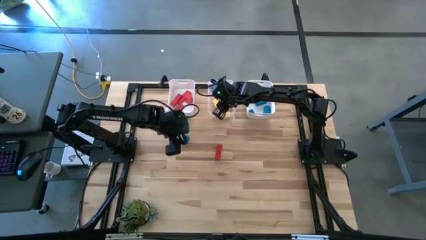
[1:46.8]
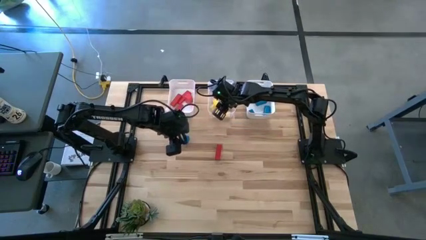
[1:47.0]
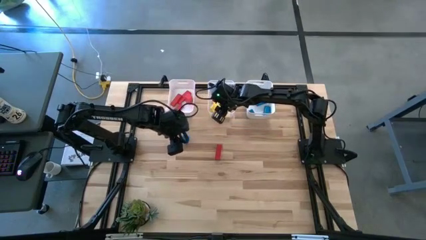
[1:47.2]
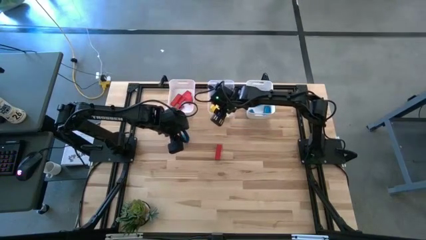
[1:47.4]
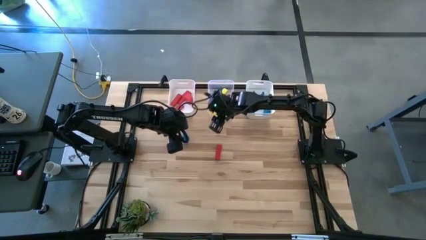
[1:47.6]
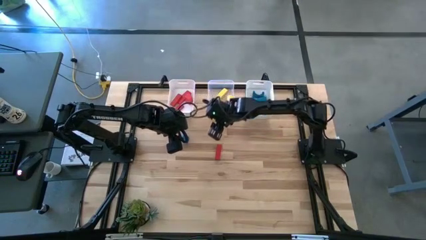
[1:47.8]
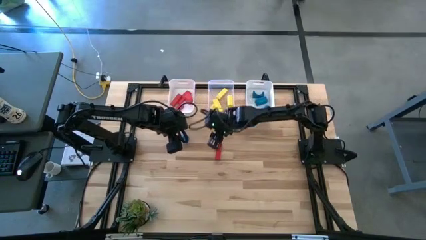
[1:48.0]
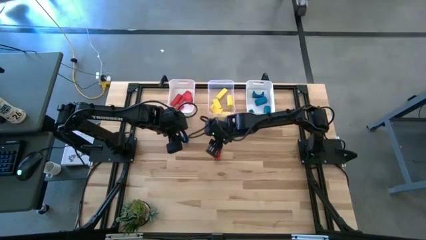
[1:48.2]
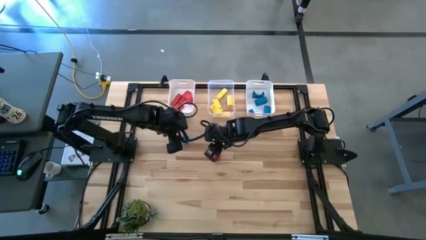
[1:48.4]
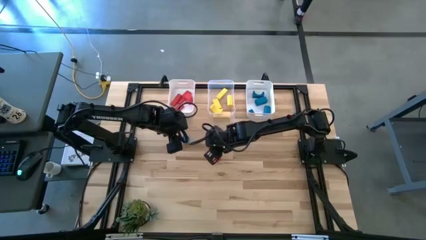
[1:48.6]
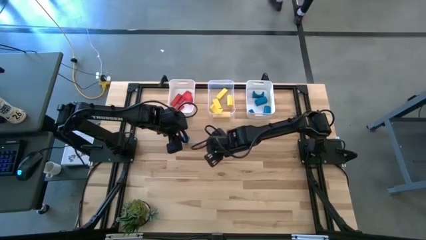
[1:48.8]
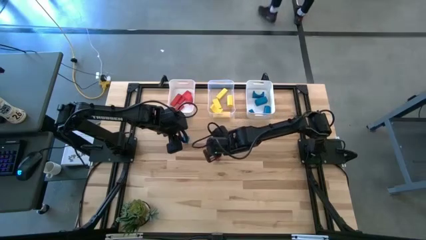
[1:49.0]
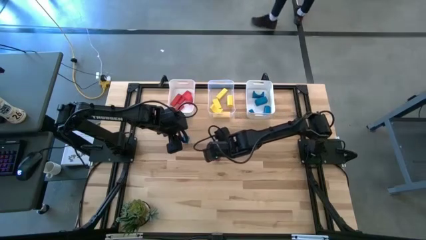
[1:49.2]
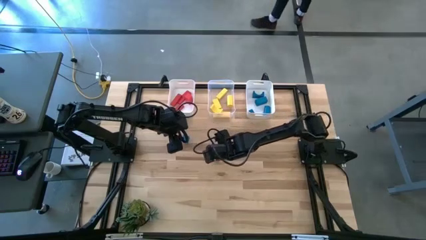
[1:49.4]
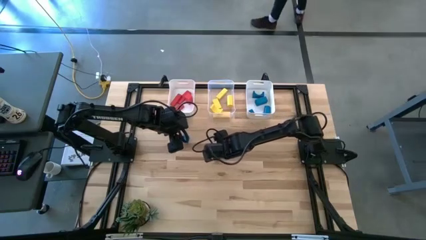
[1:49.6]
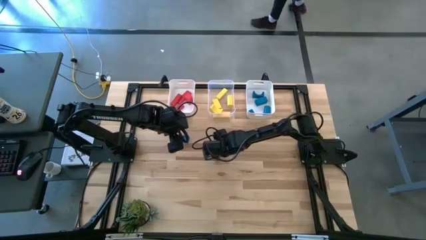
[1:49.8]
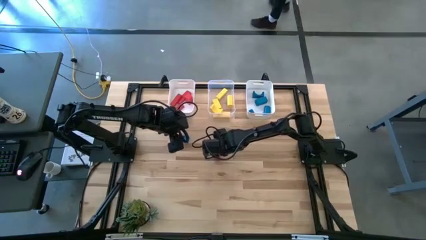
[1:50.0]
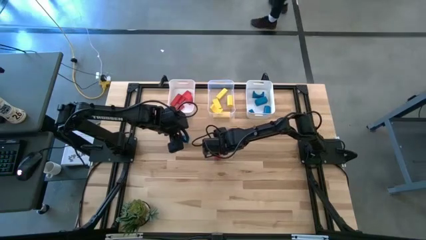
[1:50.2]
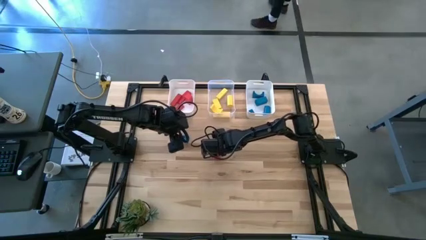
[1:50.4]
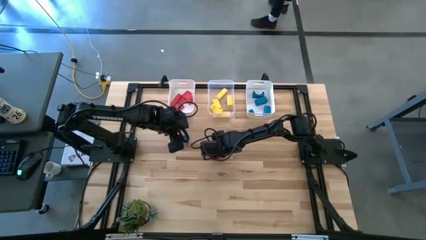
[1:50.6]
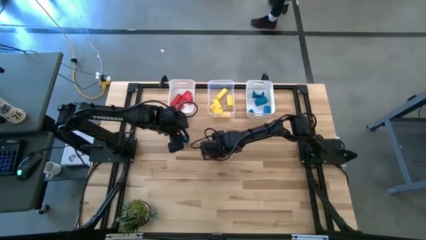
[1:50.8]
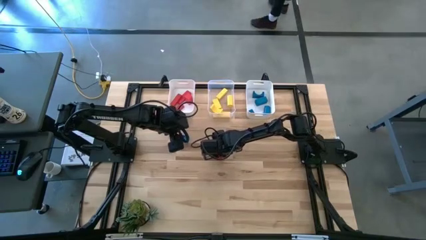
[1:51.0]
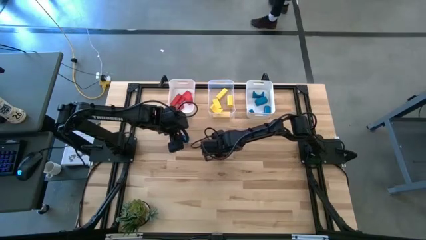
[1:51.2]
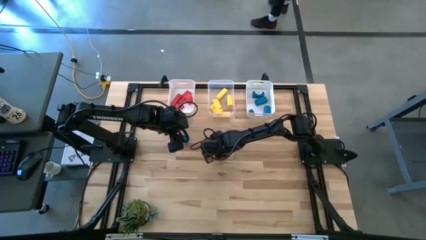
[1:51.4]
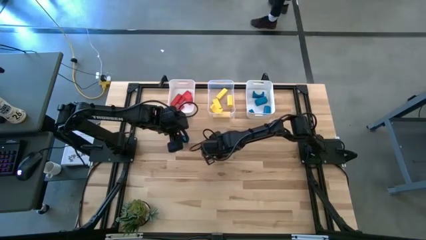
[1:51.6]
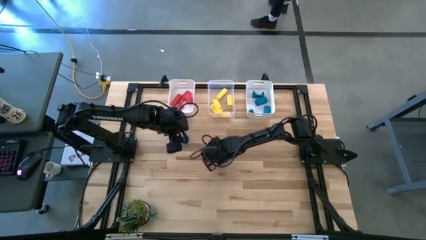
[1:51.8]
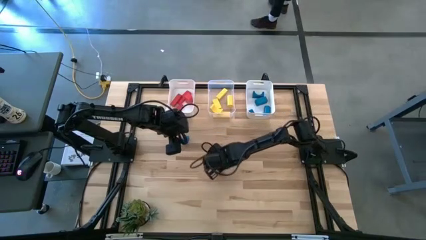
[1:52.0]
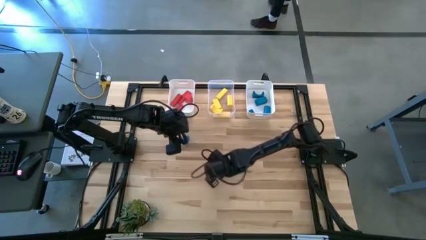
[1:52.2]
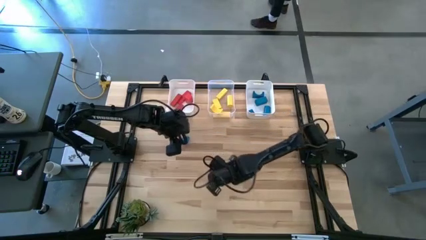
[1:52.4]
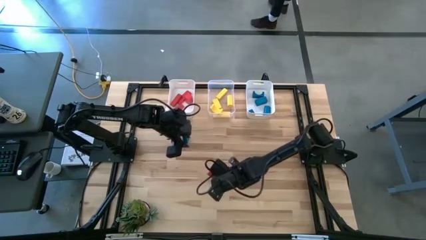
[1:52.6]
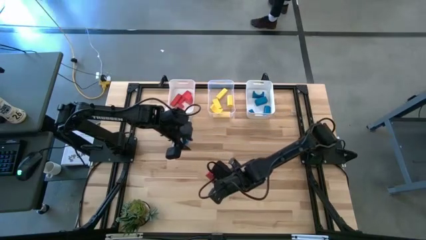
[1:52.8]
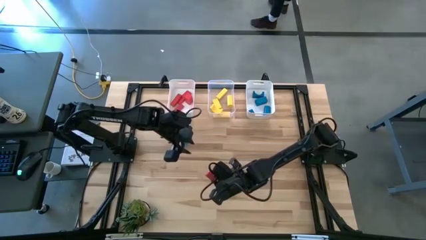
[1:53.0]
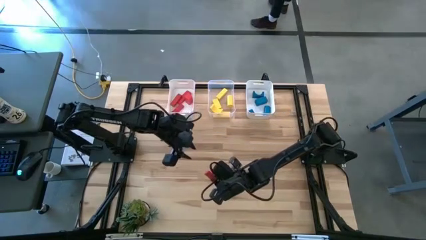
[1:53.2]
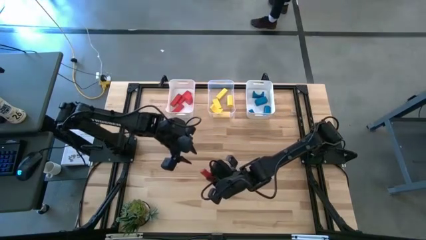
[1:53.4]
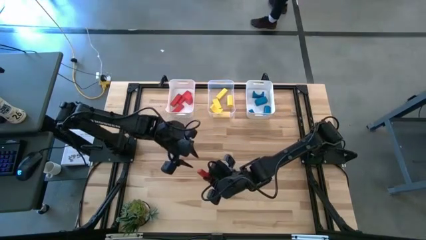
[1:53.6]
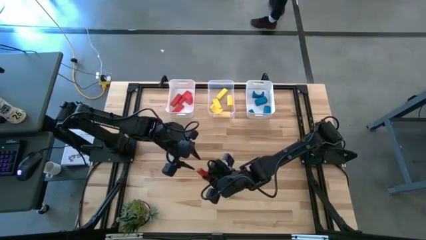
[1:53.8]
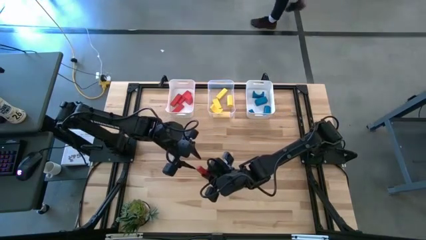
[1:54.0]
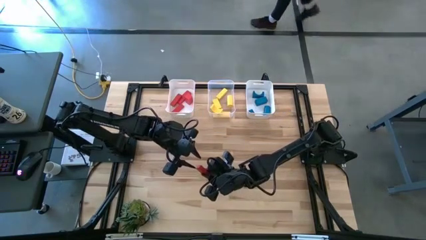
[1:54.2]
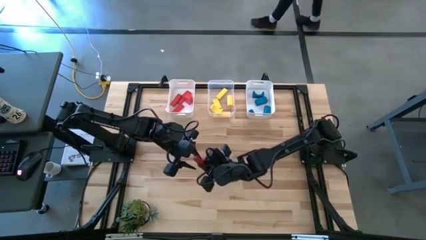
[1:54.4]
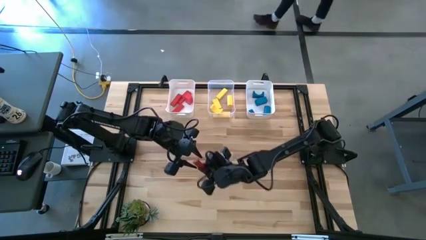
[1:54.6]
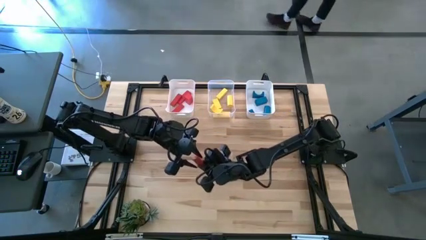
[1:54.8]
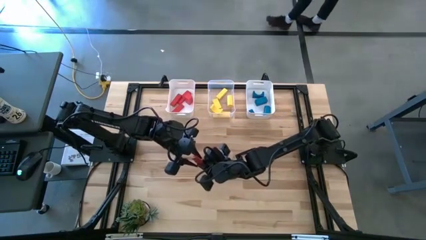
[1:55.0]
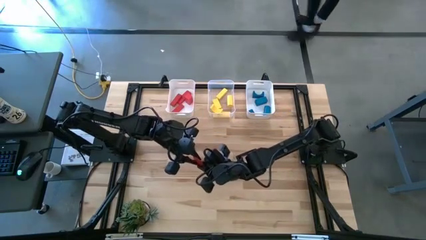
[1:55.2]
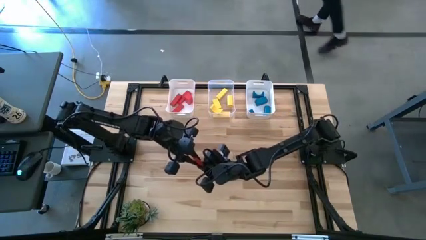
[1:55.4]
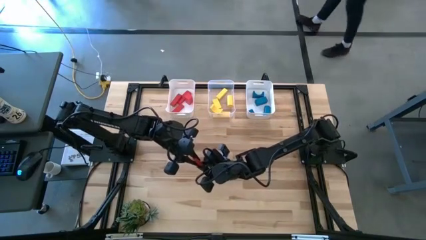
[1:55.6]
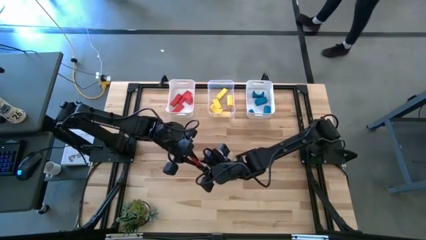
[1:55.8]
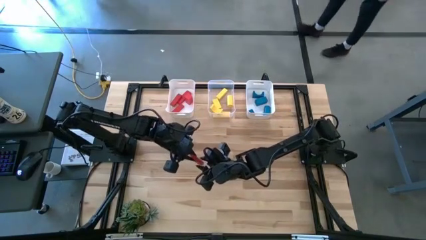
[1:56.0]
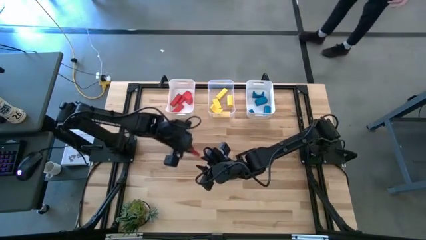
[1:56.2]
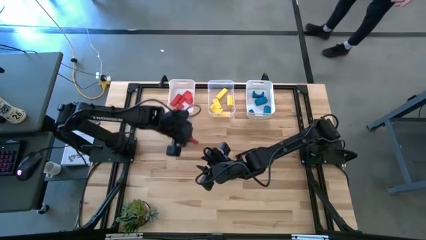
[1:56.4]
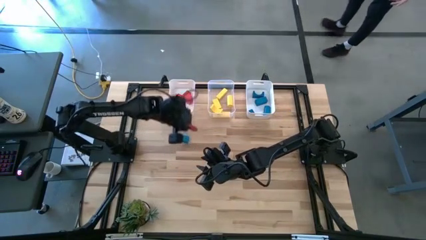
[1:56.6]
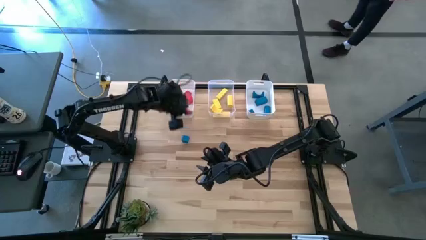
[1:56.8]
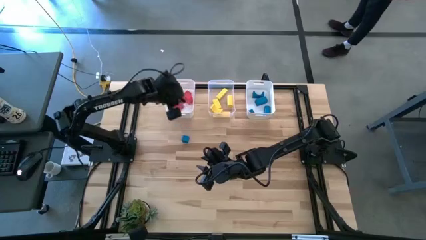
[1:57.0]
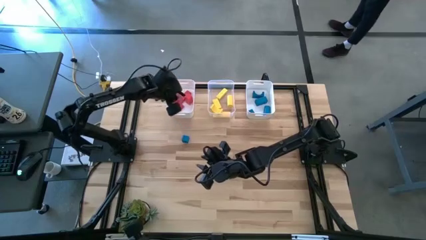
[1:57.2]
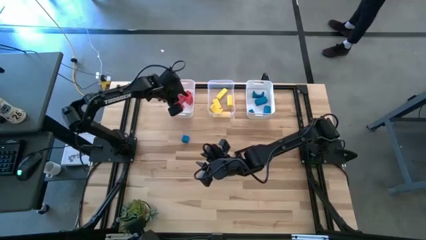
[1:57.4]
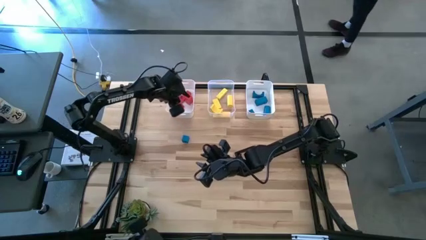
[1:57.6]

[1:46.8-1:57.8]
Task: Sort & place blocks by color
Put the red block into the left white bin

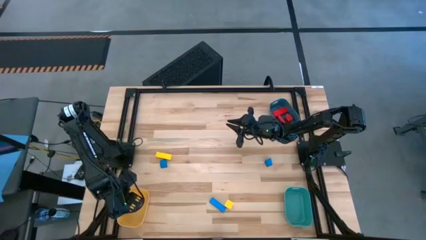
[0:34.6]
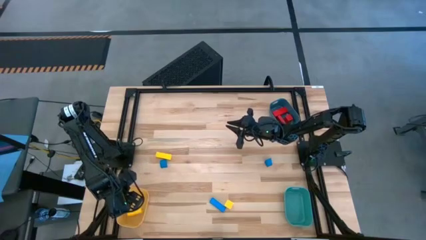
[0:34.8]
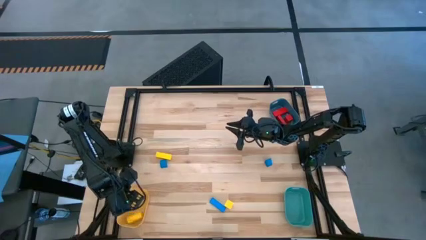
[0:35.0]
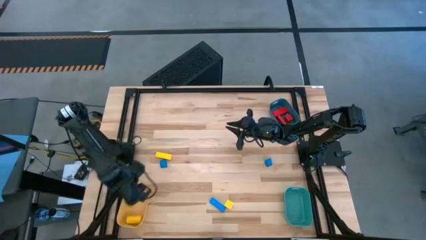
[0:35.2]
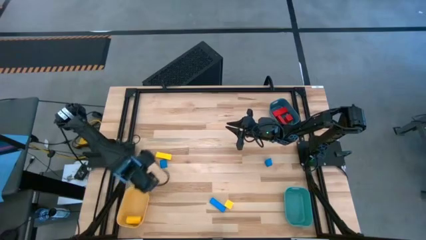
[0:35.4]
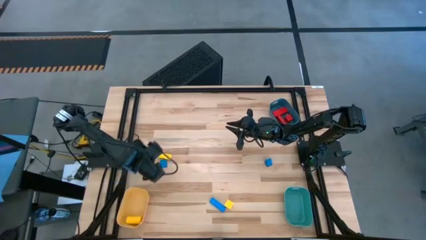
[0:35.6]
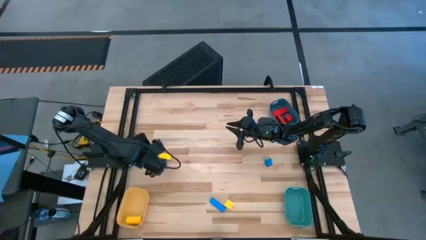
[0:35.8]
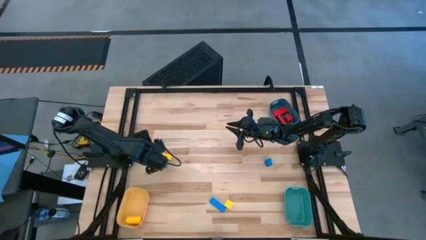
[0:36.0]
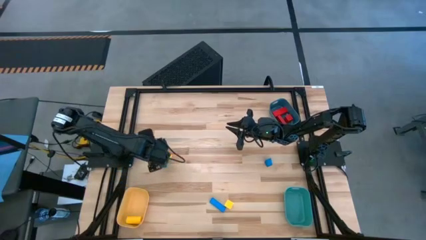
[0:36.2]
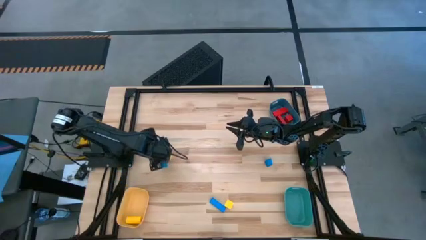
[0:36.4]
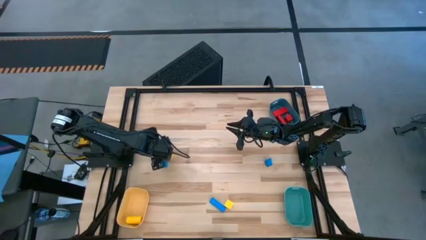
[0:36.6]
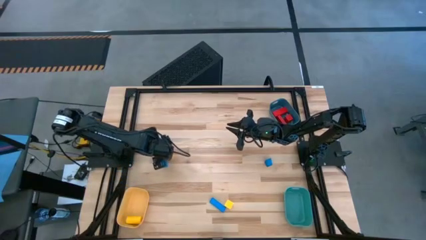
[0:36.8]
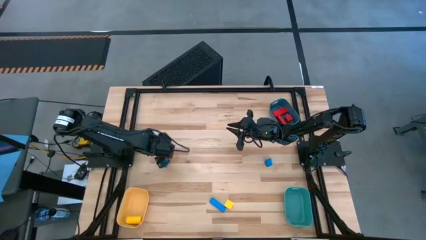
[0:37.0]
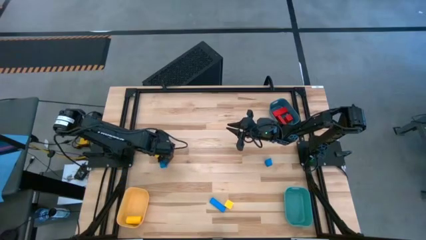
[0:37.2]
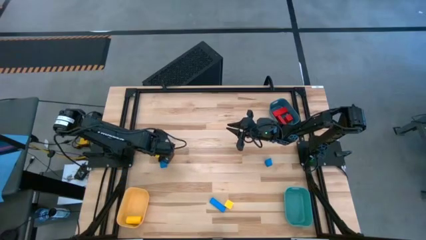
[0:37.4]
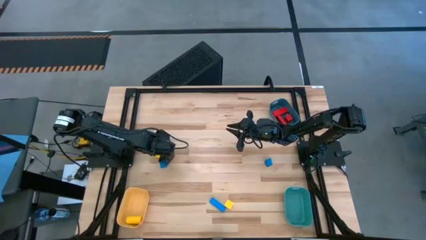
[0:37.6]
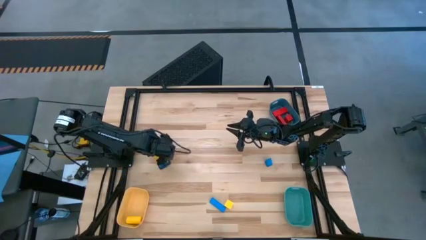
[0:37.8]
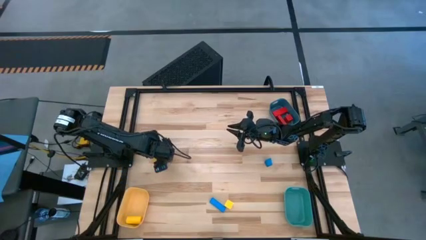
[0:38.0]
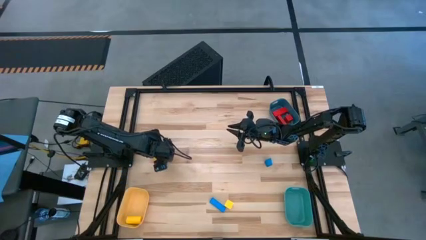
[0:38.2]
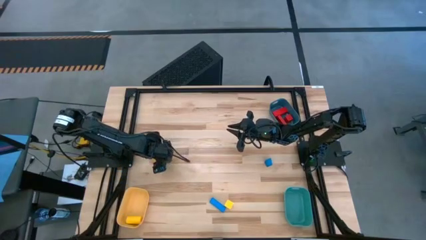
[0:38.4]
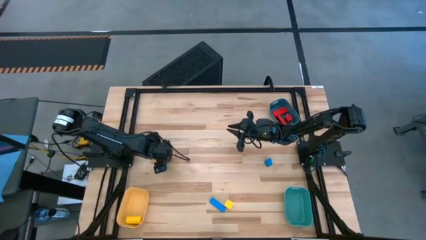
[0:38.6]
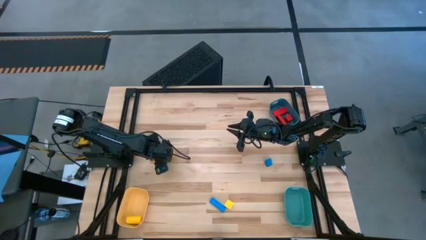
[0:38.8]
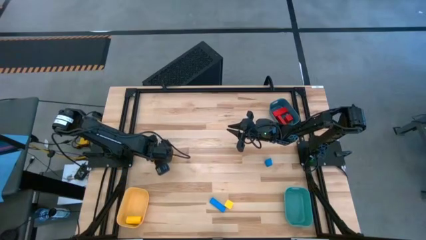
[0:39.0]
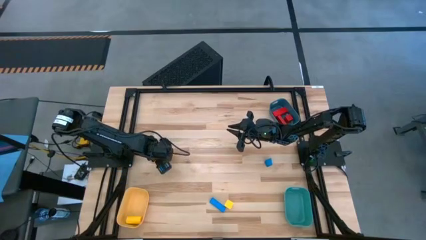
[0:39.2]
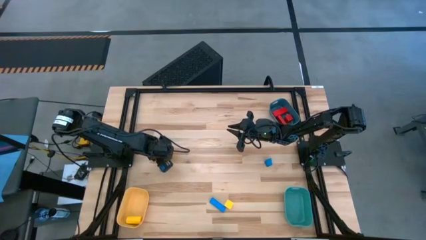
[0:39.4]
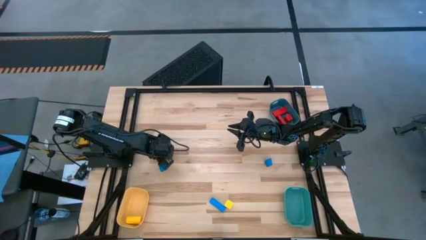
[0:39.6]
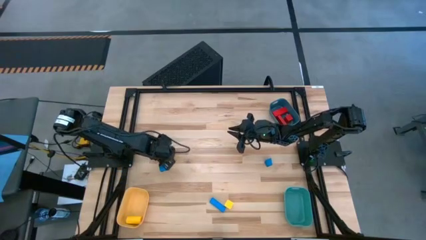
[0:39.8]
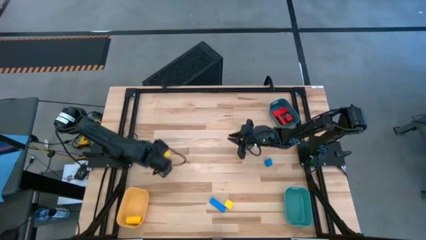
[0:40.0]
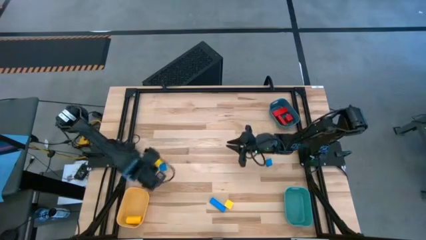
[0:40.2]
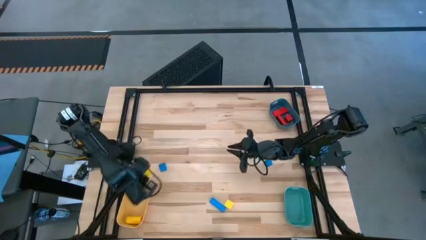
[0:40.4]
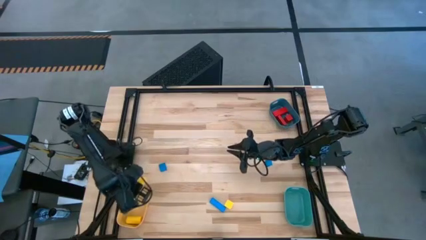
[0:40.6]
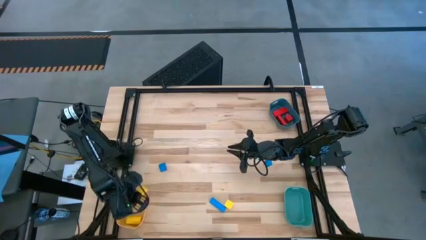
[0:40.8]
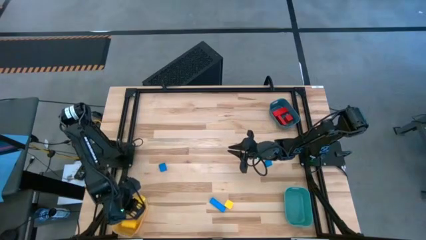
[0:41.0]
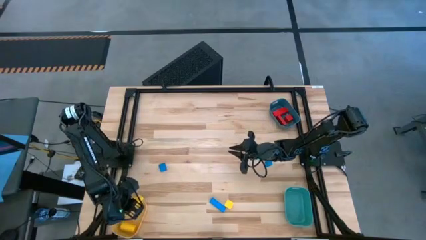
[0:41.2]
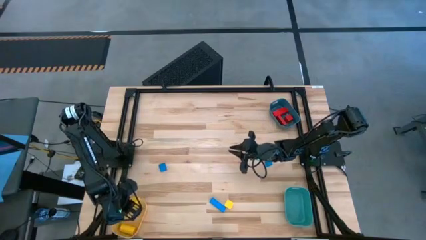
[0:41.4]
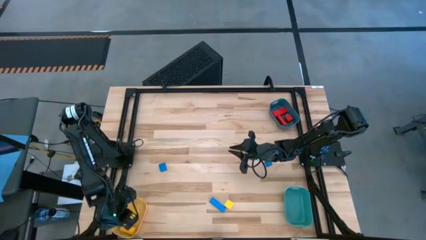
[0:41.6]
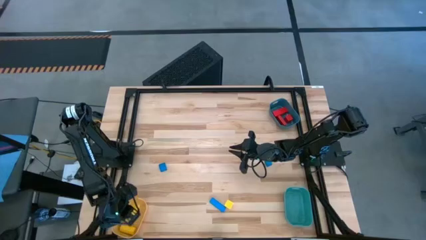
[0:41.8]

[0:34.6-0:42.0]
Task: Sort & place blocks by color
Put the left yellow block into the yellow bin
